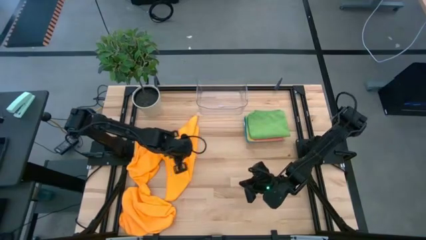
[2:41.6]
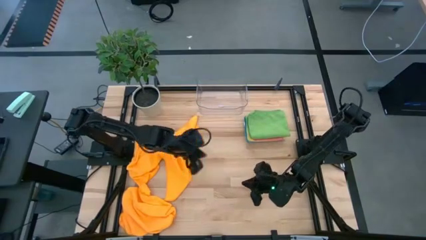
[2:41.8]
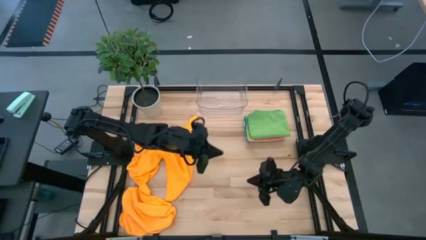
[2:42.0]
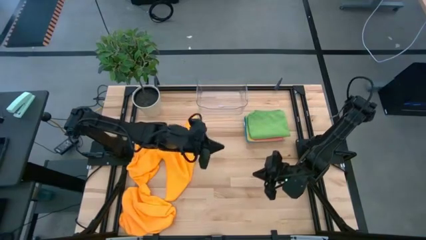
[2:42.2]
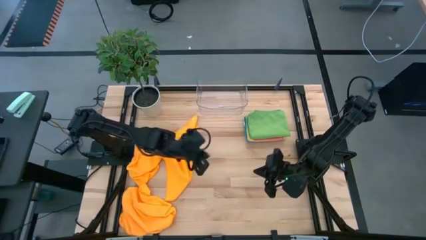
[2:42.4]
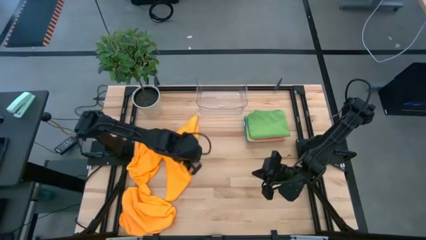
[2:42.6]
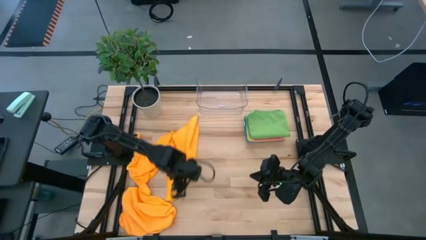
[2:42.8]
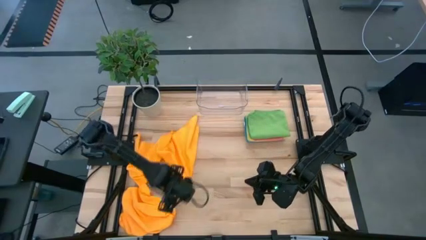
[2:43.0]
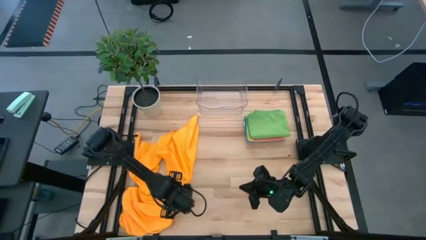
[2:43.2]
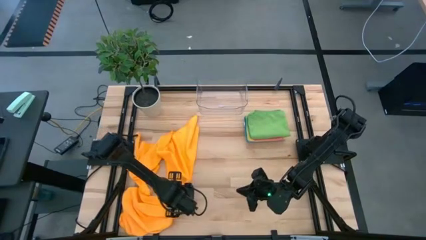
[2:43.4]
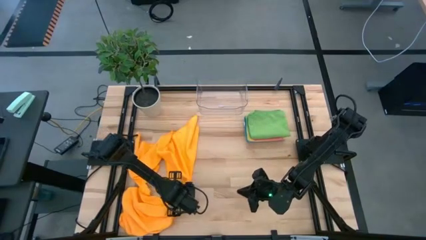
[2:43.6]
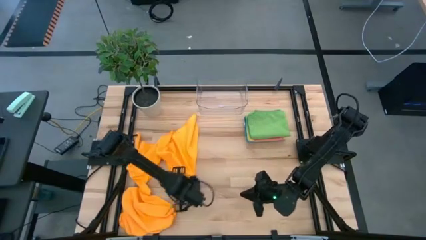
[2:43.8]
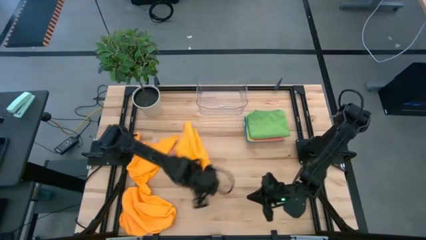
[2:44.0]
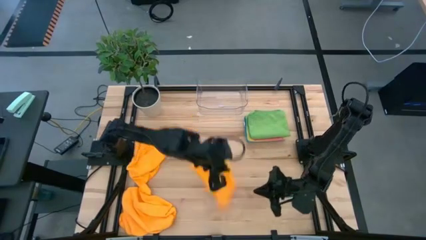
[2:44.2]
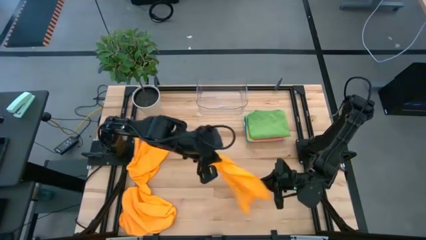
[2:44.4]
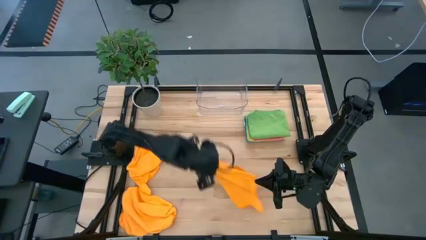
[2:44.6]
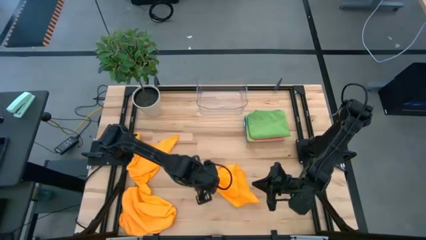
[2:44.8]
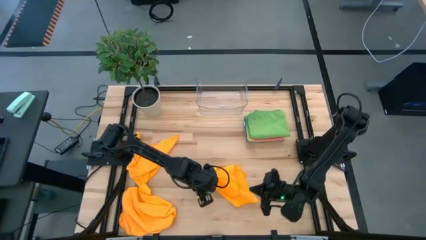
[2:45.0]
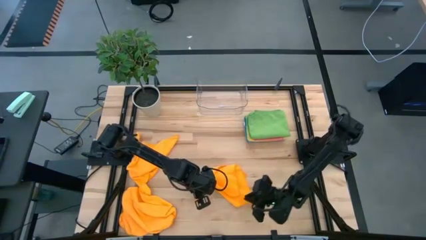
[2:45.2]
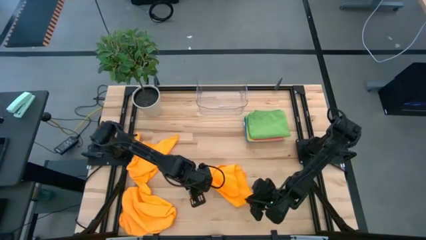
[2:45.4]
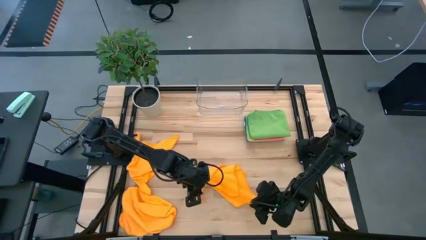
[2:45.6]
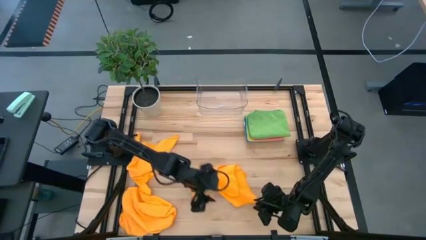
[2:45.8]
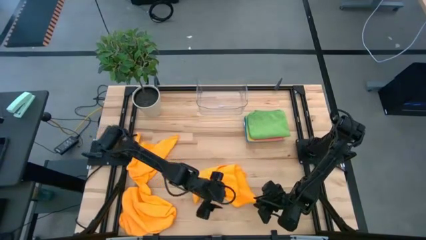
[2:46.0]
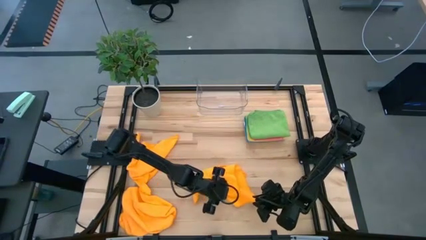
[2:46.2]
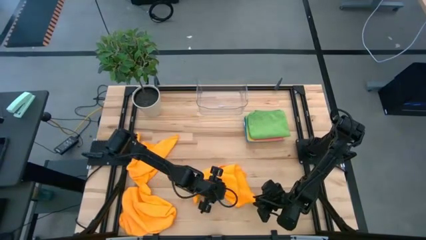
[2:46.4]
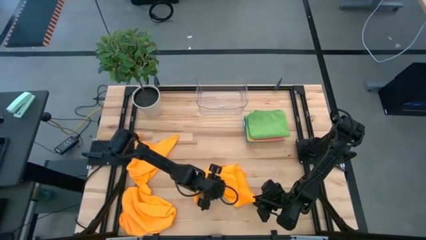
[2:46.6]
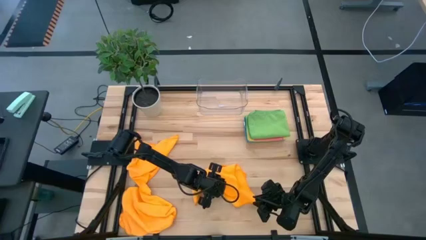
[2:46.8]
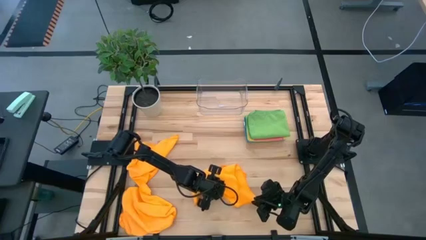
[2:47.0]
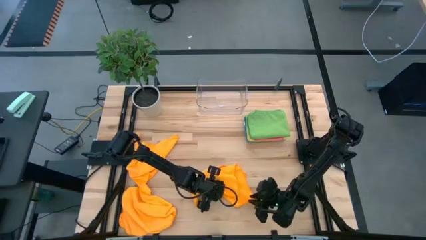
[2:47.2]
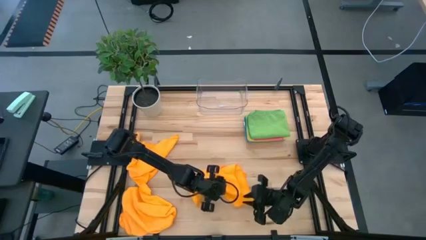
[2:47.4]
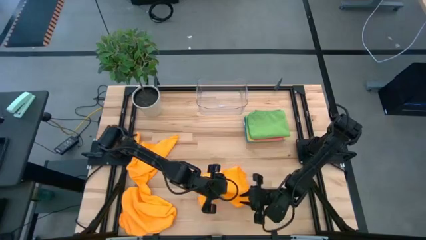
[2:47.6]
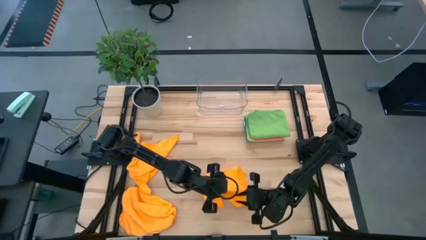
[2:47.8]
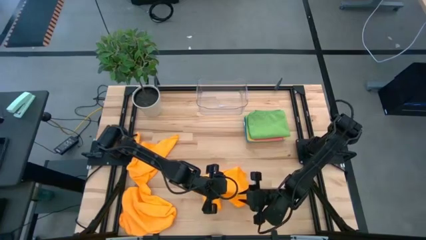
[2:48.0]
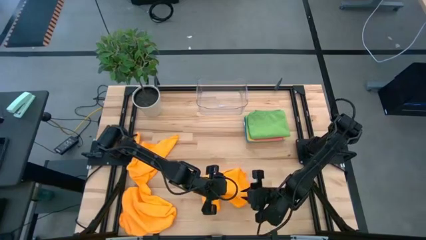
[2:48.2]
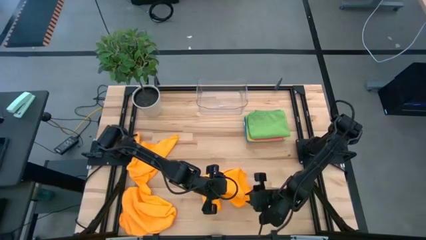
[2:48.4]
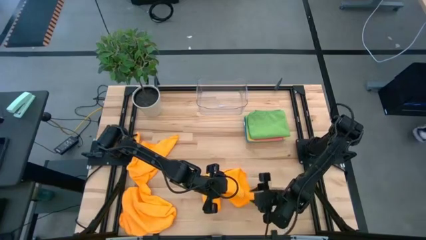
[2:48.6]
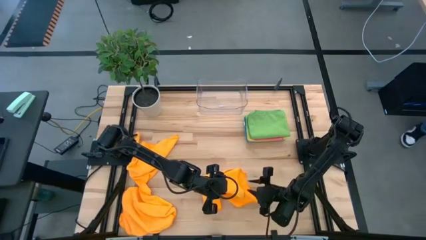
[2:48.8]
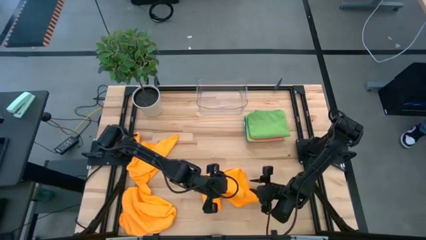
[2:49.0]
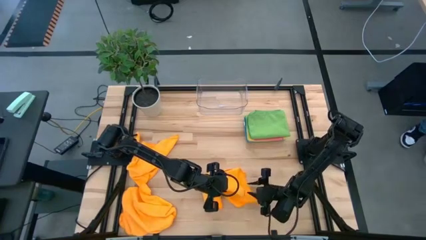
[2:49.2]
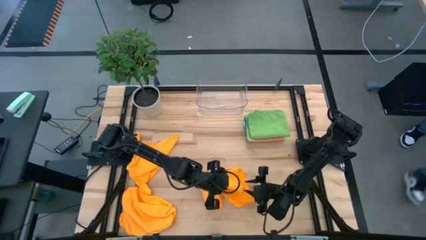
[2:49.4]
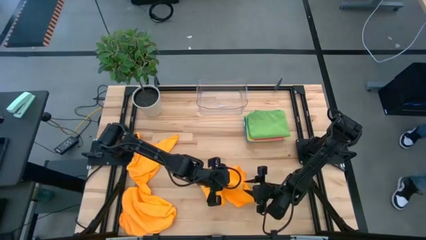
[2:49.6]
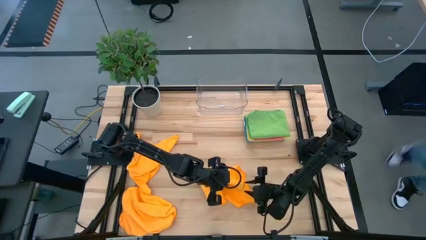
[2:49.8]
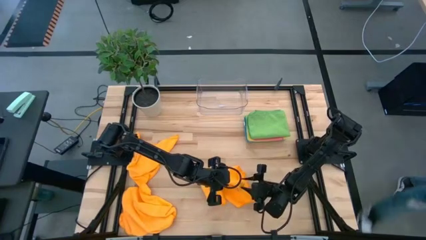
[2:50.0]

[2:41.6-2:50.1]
Task: Fold microfiber towels
Fold the top right orange towel

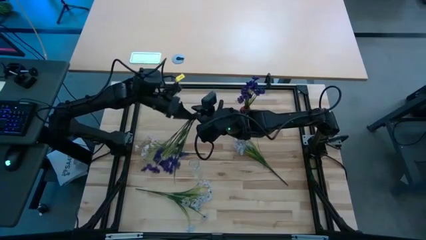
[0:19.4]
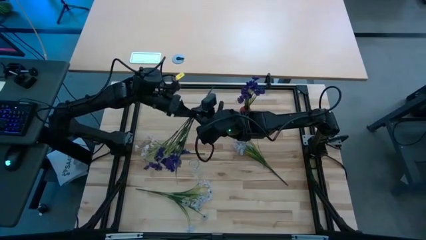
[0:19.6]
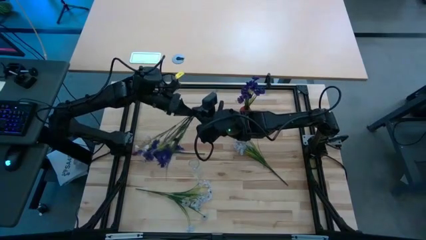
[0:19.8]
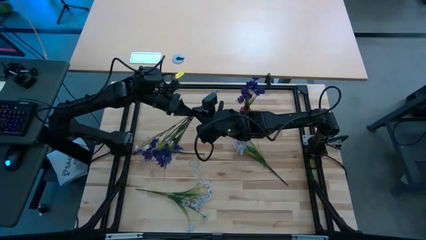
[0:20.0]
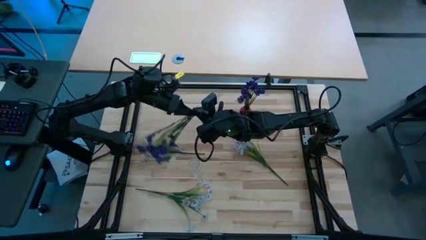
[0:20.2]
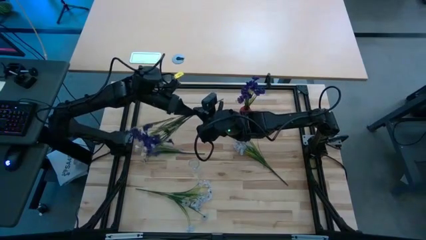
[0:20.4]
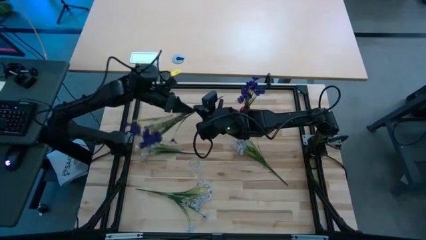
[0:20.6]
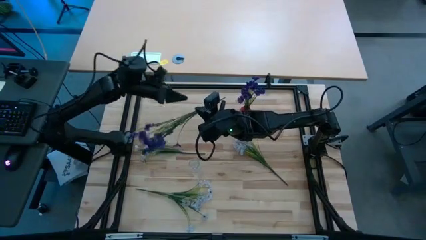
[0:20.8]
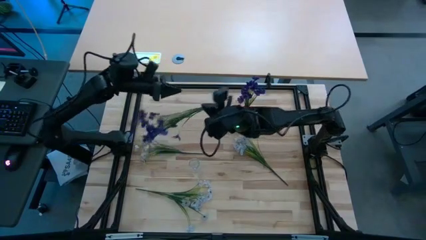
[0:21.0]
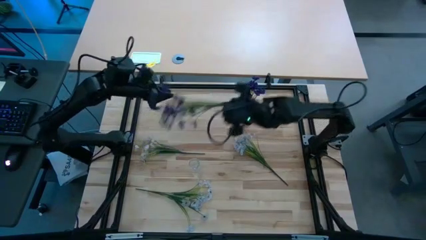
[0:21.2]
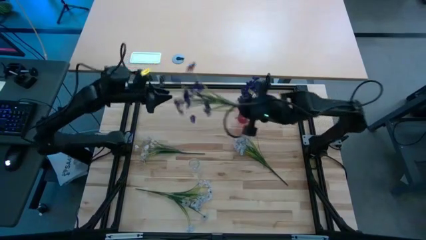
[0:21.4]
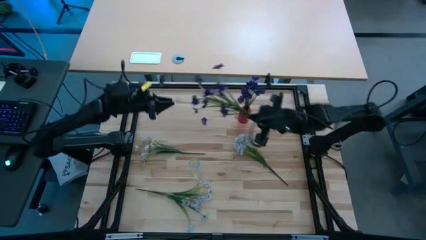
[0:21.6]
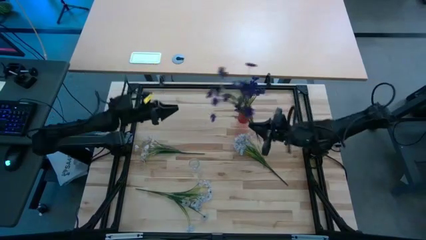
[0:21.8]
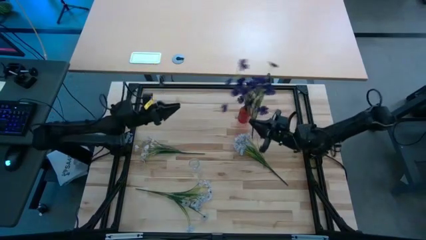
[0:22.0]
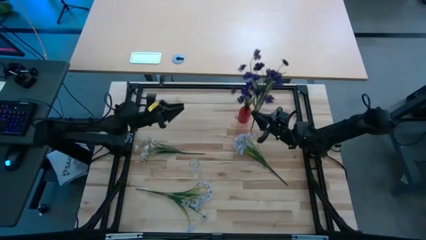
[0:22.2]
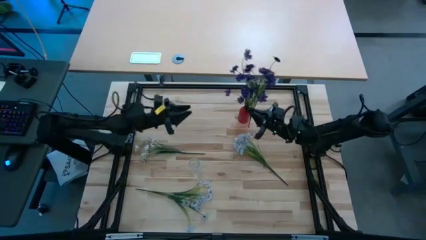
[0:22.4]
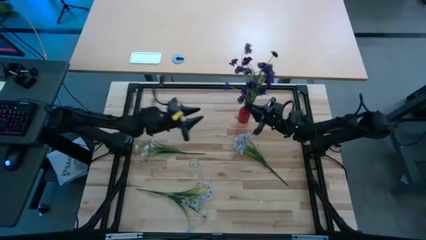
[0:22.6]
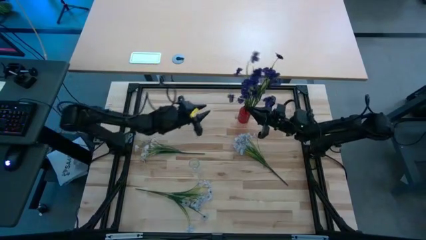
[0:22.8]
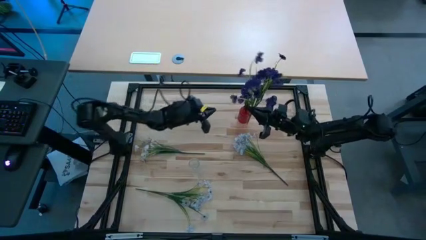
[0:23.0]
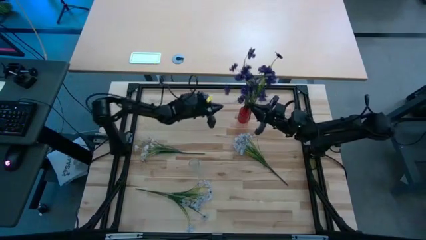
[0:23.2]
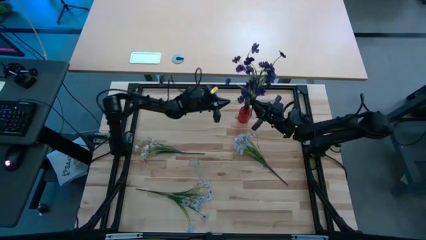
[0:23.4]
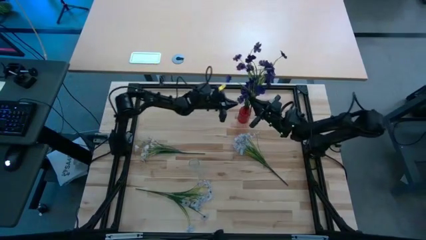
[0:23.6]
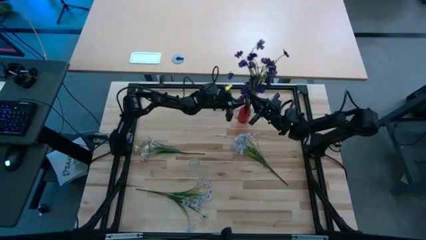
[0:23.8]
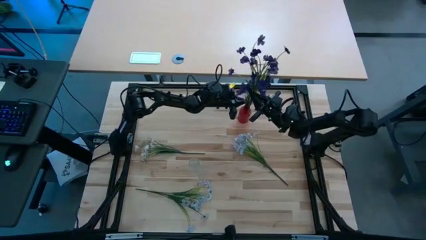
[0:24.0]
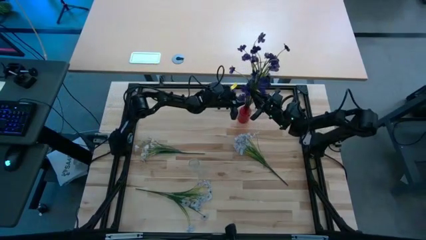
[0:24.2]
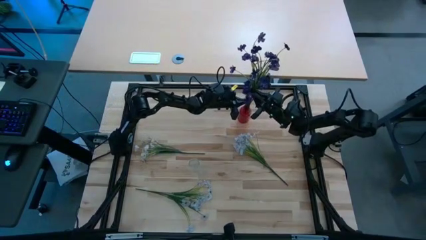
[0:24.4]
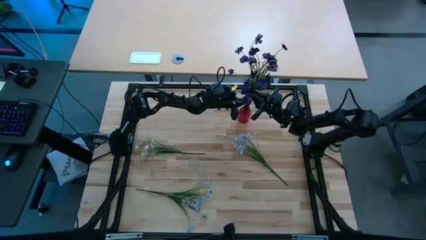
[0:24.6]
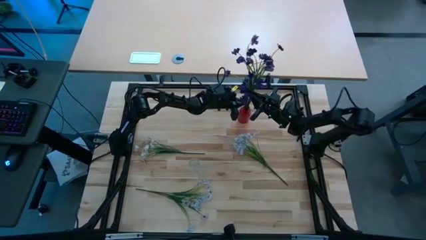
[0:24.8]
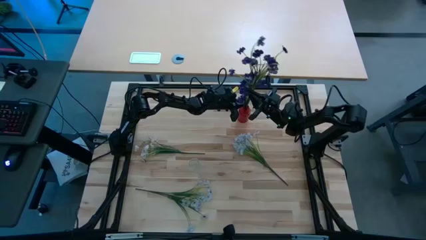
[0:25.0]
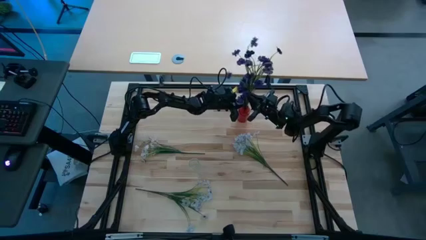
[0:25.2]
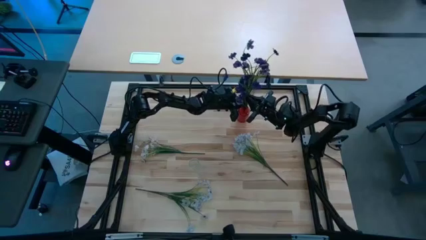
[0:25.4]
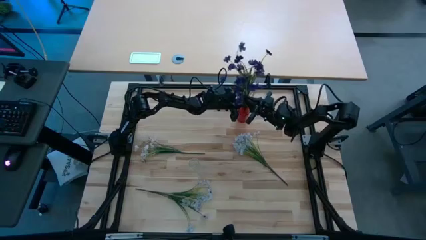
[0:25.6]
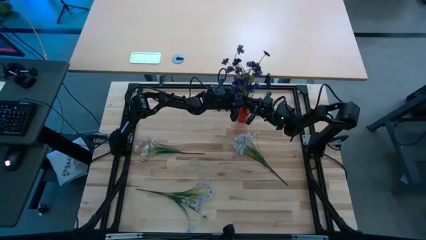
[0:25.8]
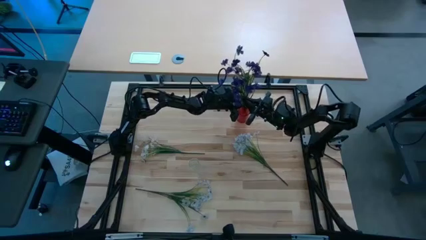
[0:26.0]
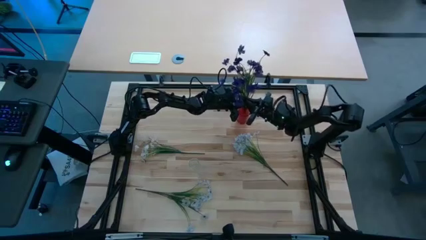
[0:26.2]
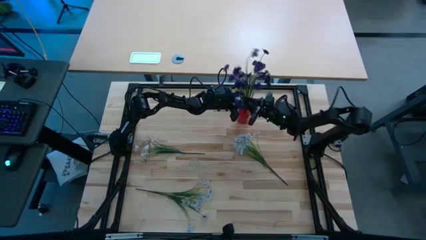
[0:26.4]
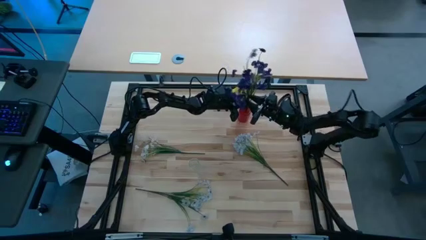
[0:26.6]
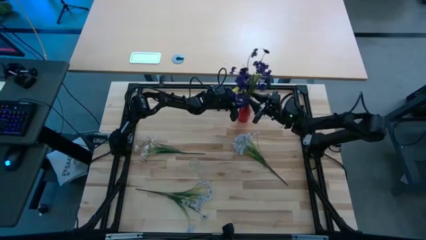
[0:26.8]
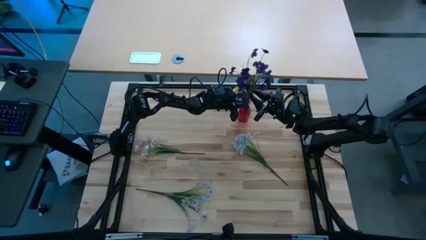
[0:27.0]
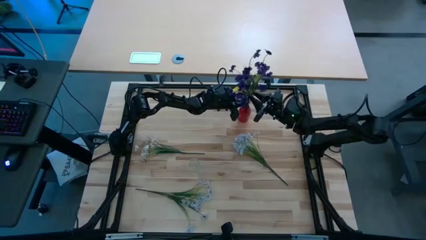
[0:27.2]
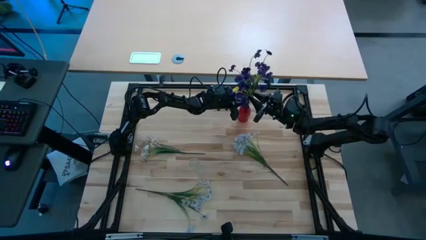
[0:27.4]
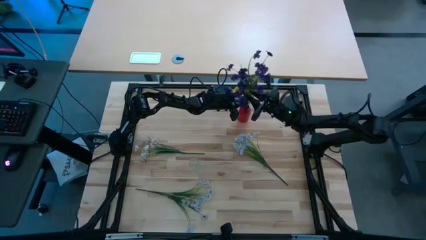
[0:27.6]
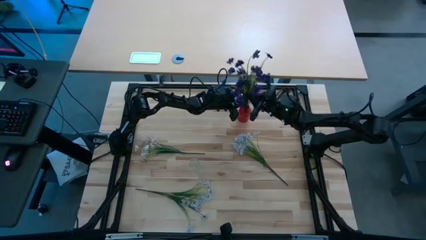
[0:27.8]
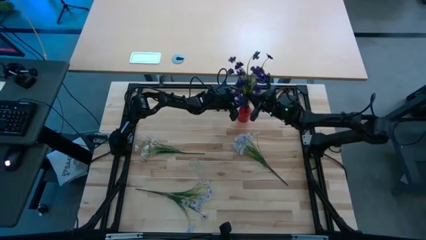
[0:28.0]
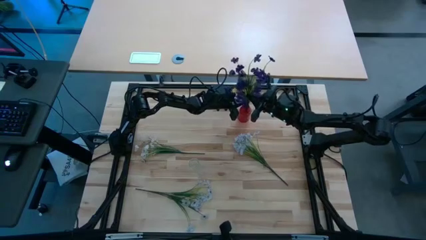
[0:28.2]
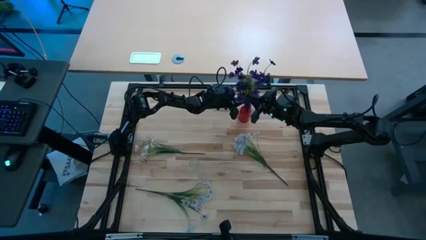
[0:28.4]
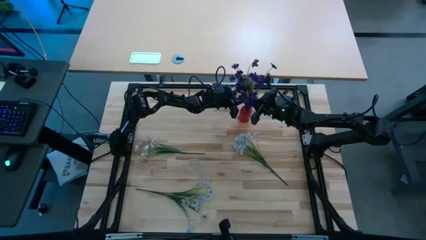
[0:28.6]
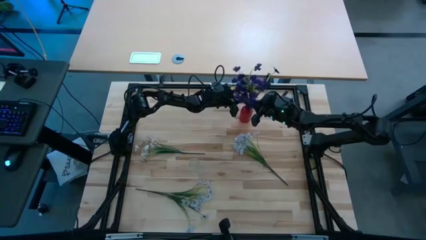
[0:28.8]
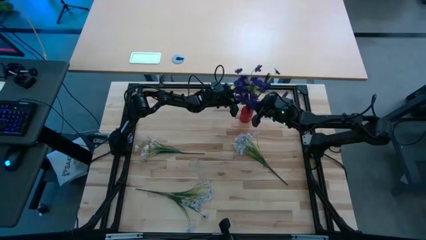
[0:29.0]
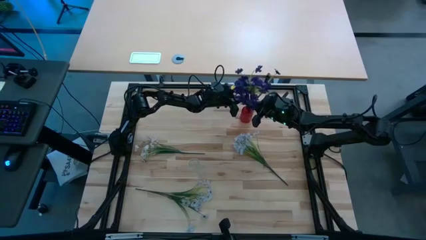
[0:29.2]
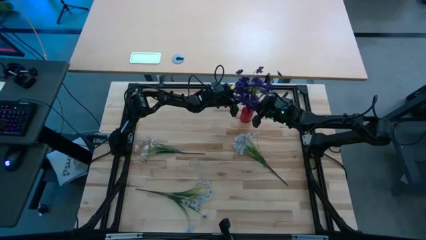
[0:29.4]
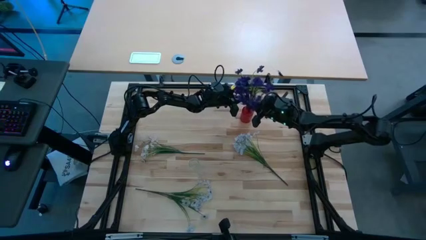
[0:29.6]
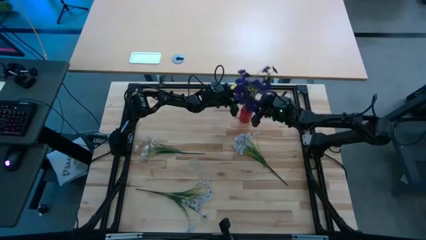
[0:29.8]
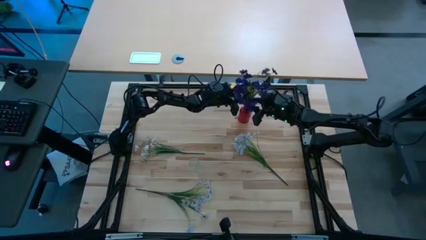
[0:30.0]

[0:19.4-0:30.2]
Task: Sort flowers into vase by color
Put the violet flowers into the red vase
